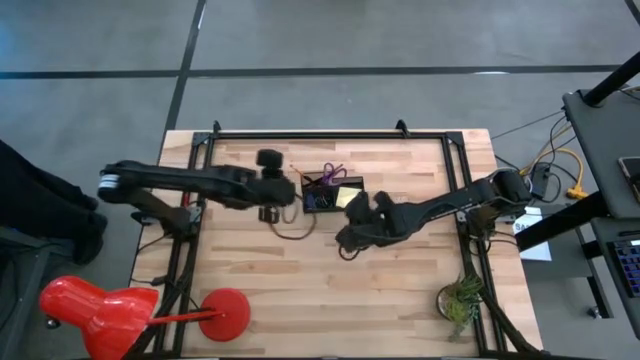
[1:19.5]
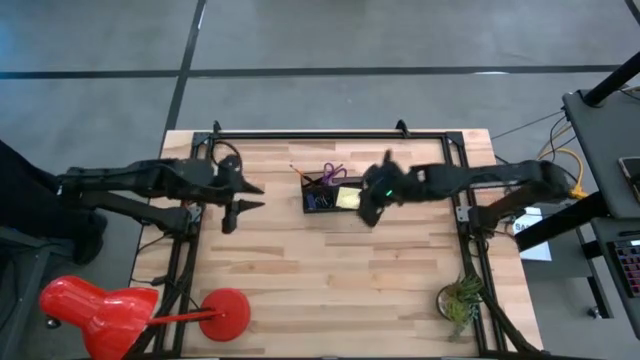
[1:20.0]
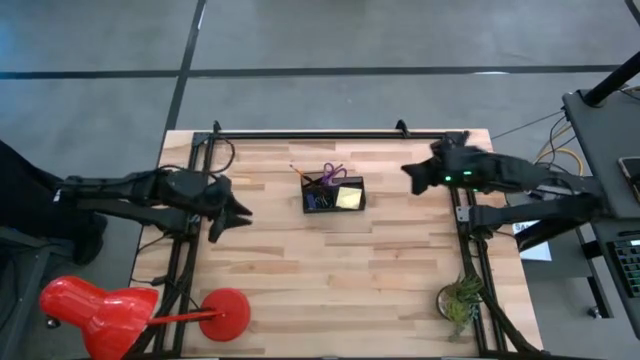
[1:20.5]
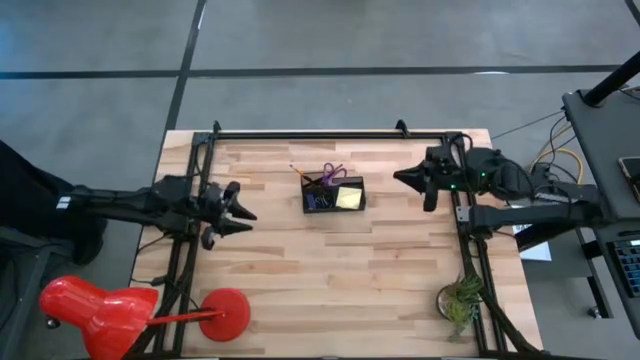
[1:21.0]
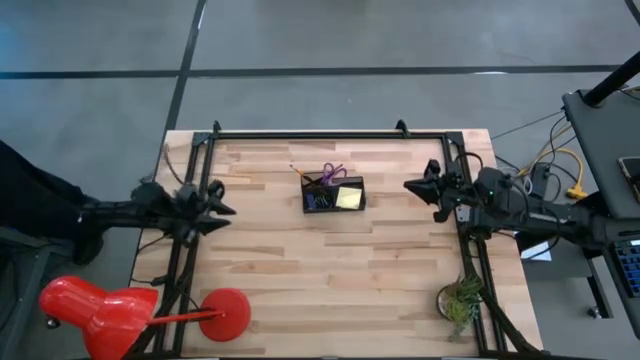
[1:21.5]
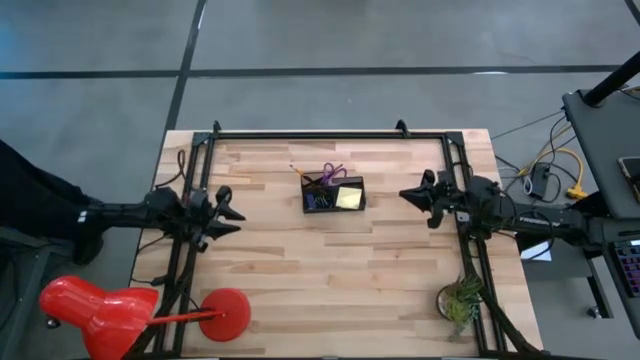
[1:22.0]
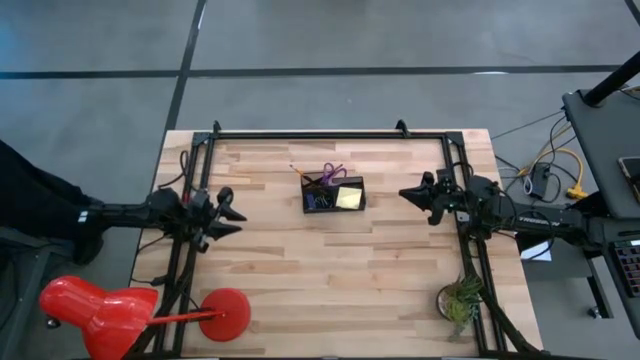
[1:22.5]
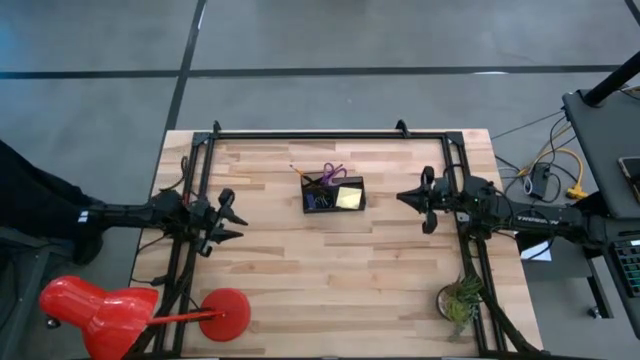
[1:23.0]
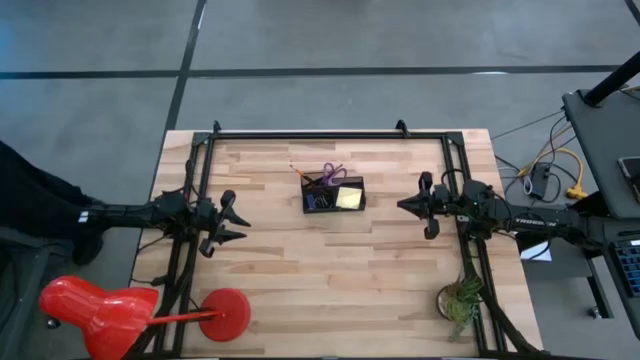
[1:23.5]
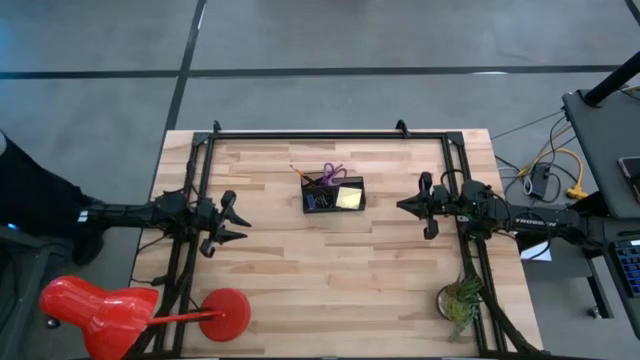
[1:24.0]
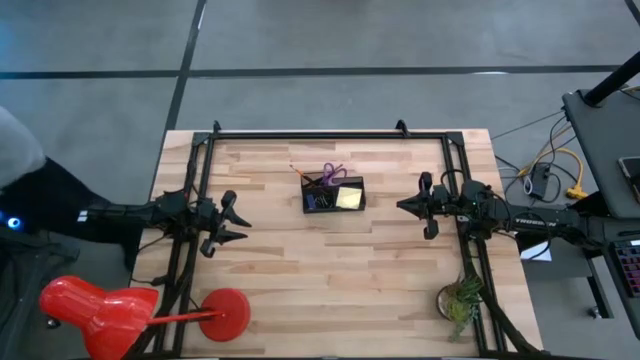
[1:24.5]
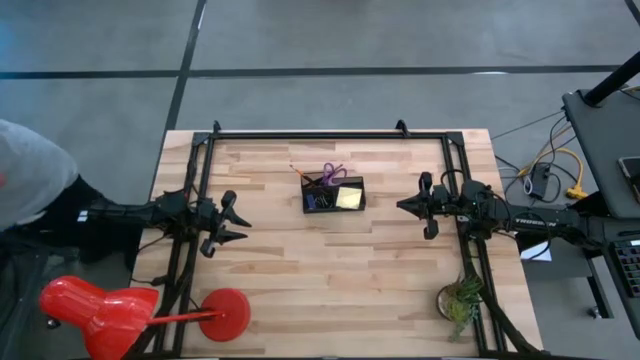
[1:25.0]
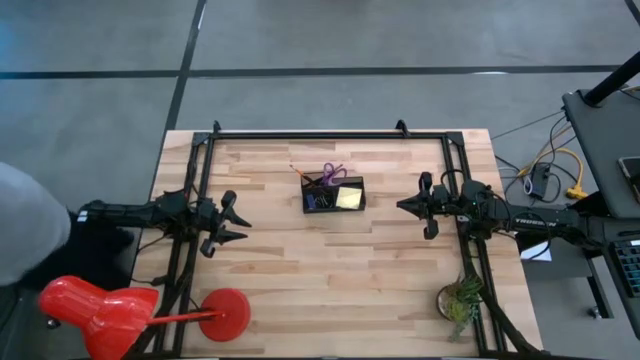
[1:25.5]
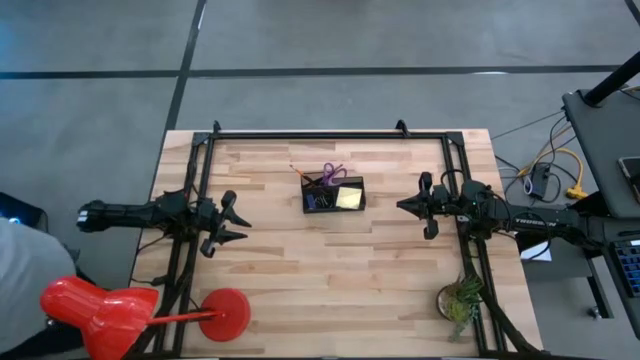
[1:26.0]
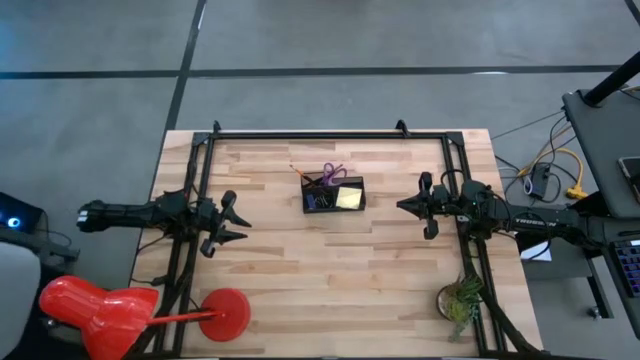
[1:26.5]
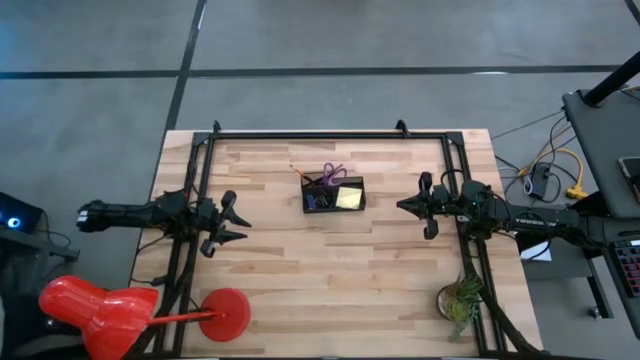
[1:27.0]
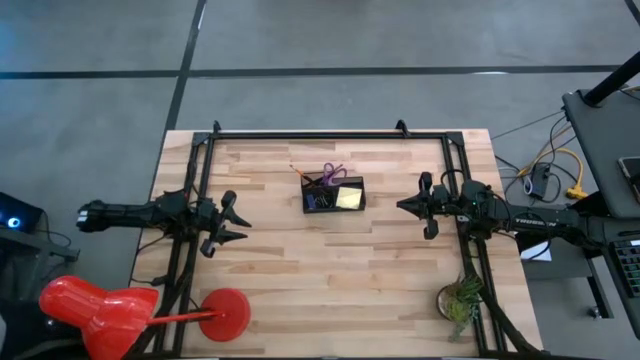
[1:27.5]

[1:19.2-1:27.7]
Task: Pick and place office supplies into organizer
Return to Home Position

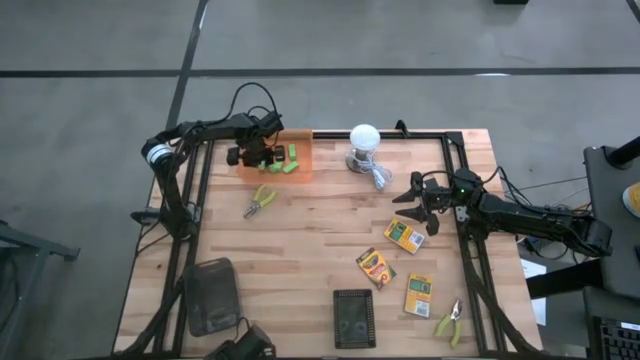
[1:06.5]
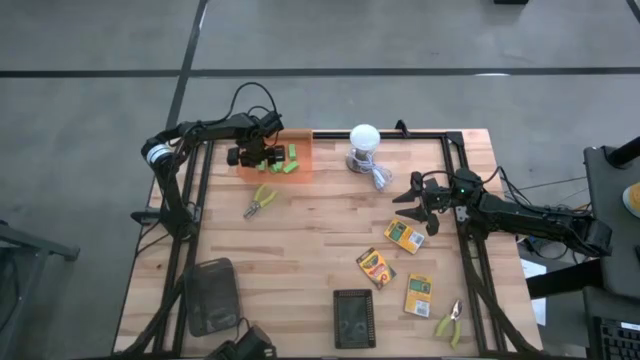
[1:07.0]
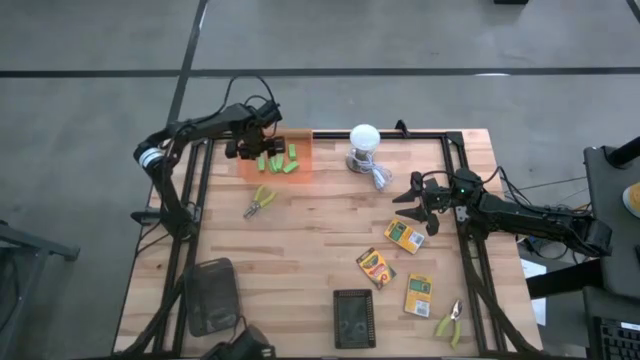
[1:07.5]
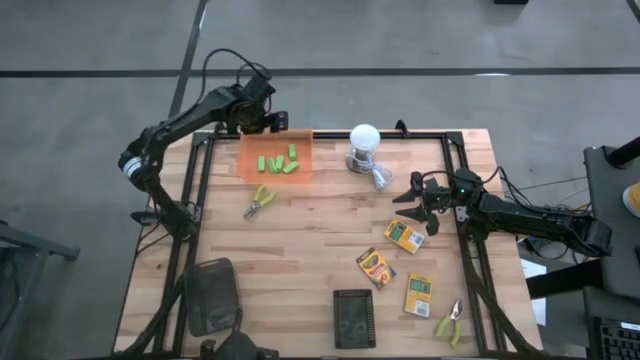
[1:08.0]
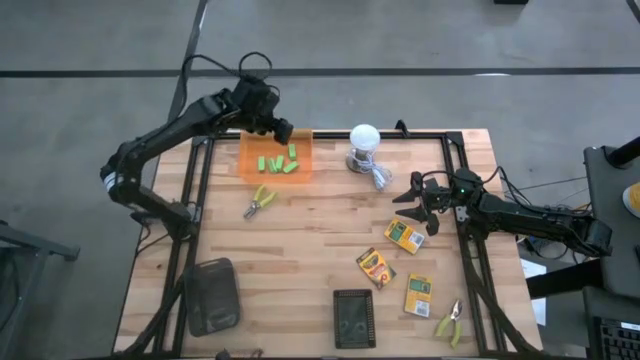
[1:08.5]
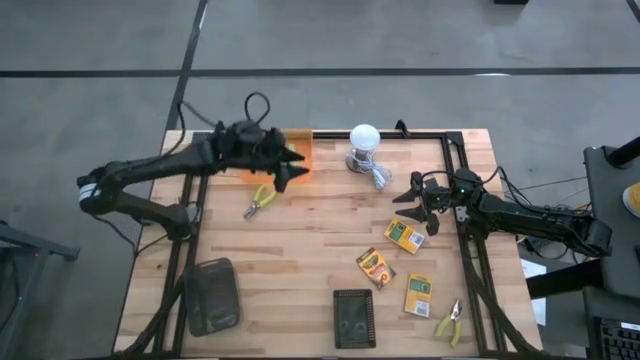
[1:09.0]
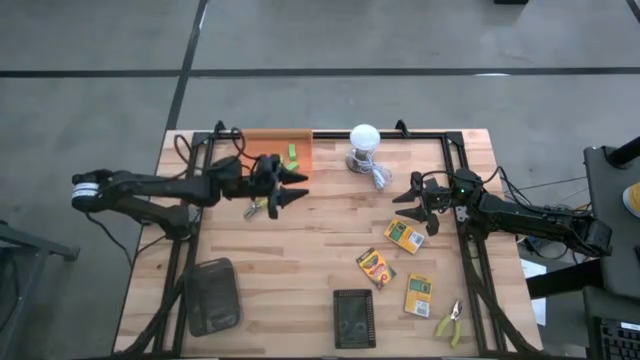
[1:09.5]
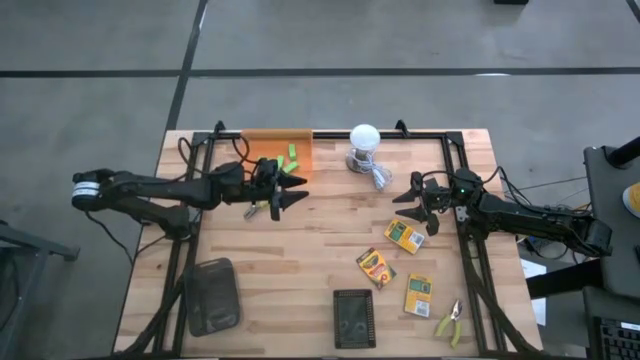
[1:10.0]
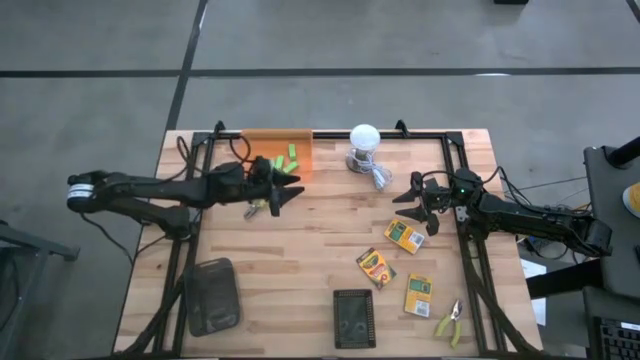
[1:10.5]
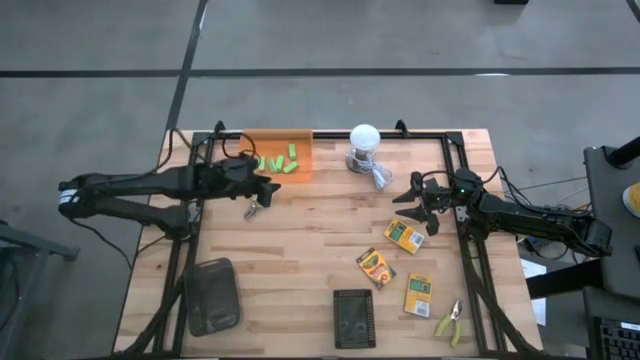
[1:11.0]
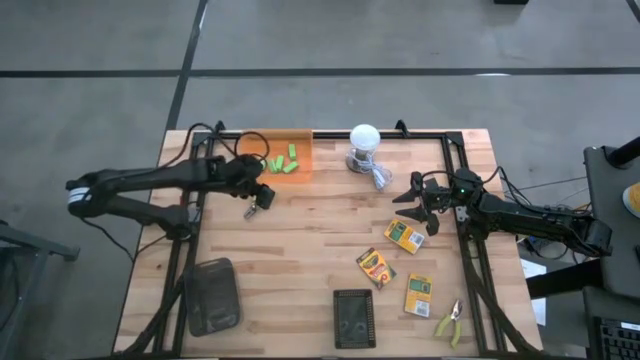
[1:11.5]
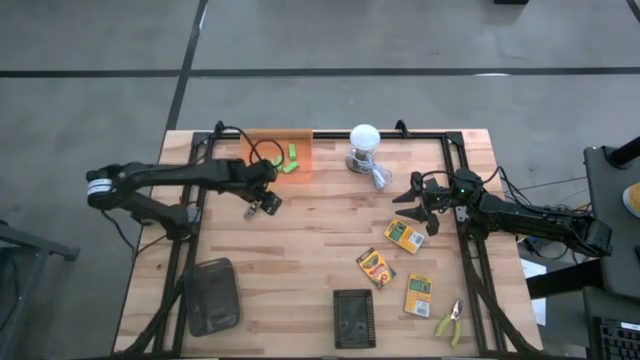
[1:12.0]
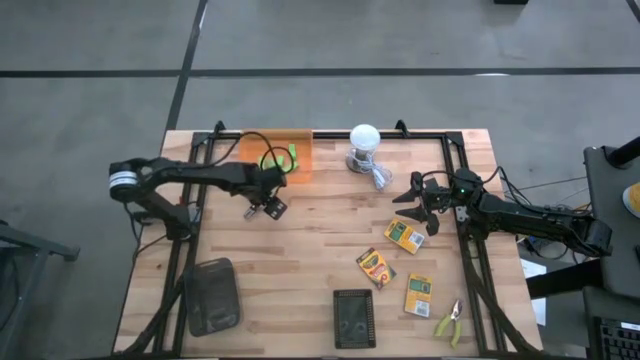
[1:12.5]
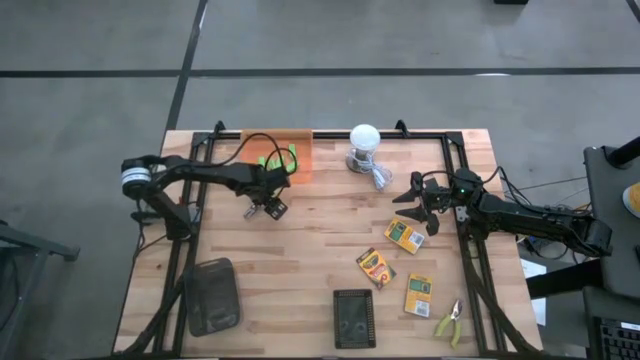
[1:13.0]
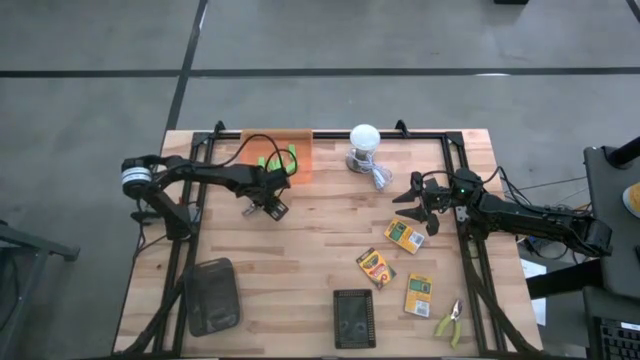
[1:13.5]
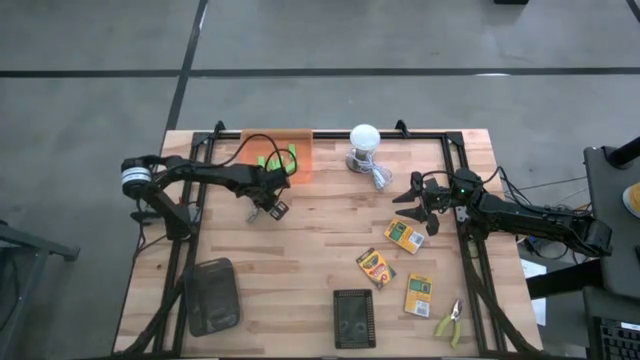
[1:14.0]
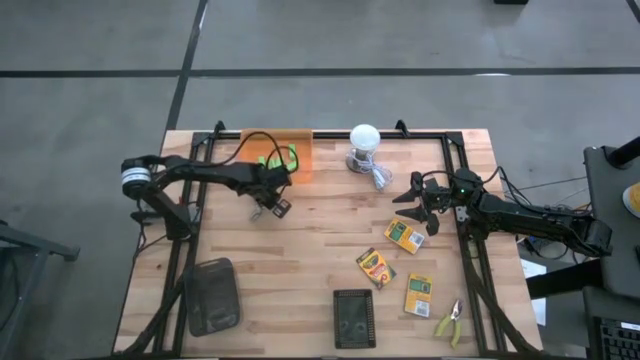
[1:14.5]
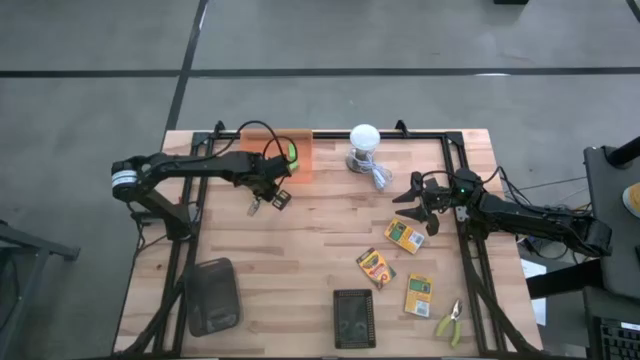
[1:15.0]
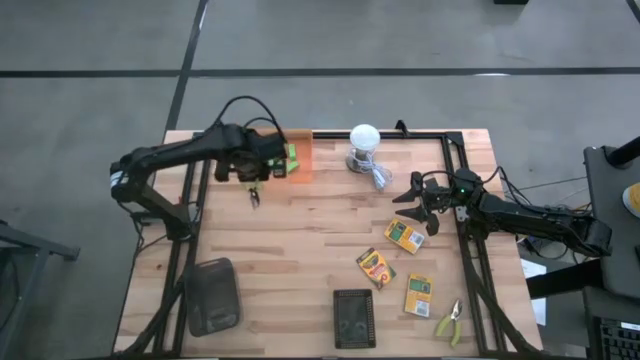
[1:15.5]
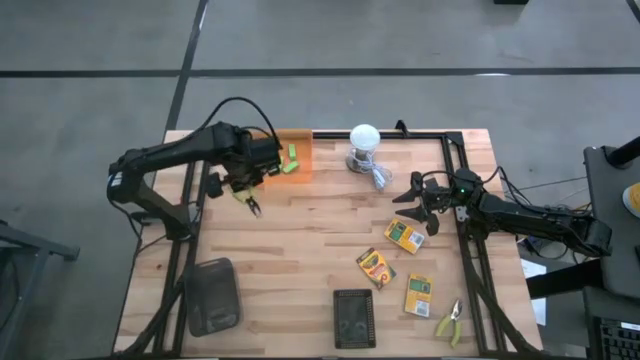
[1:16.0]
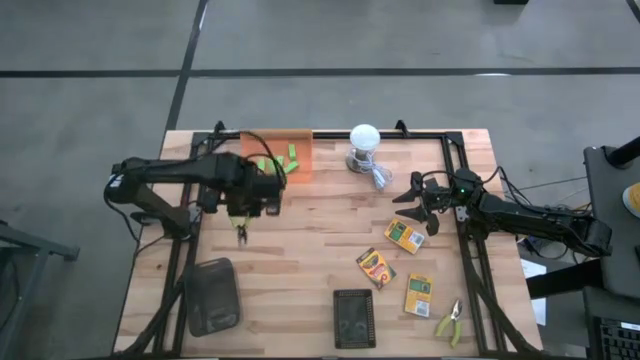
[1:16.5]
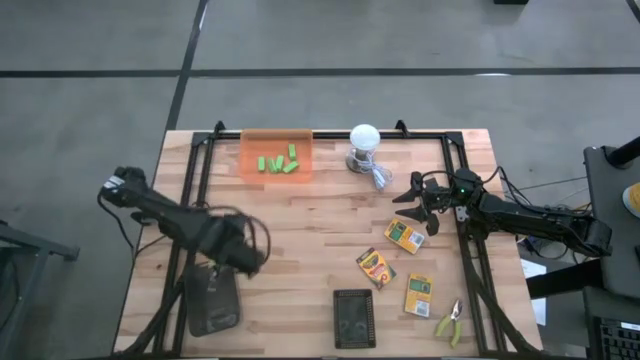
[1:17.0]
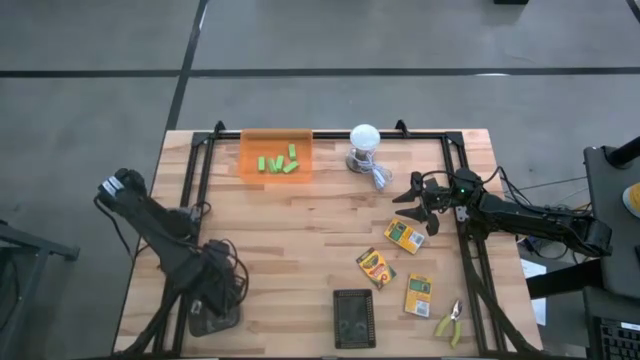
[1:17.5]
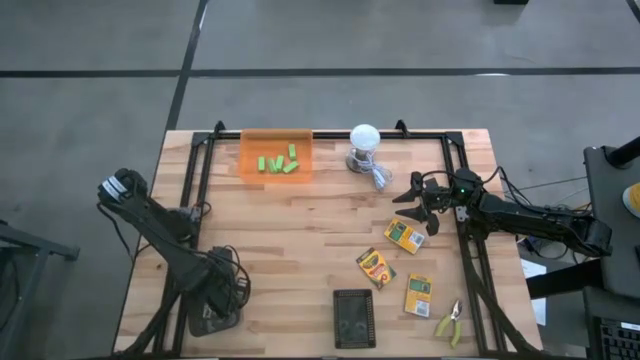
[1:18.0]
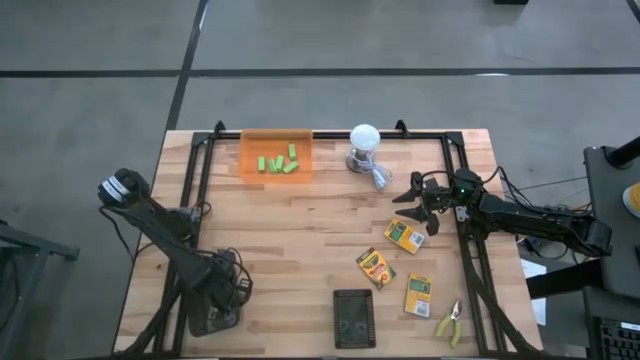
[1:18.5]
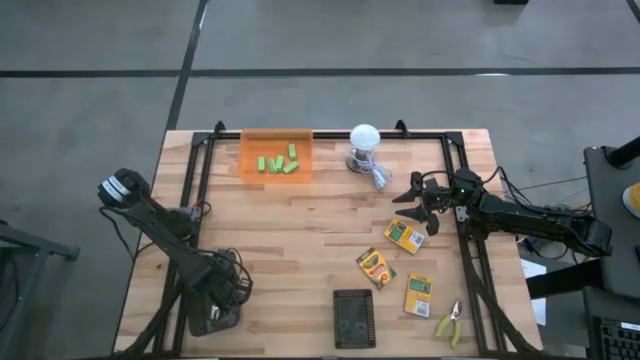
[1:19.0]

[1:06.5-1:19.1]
Task: Pick & Place School Supplies
Put the green hole puncher into the left black bin
